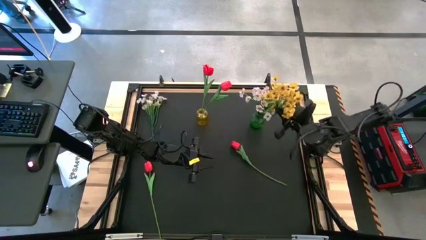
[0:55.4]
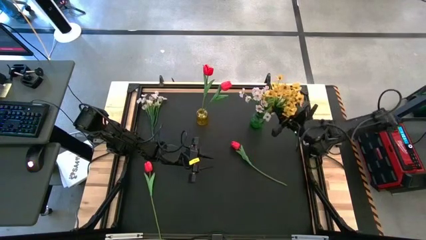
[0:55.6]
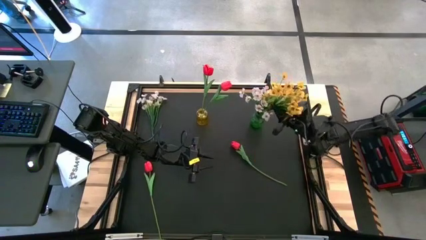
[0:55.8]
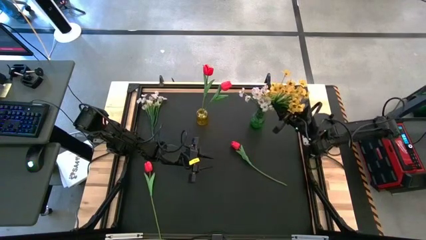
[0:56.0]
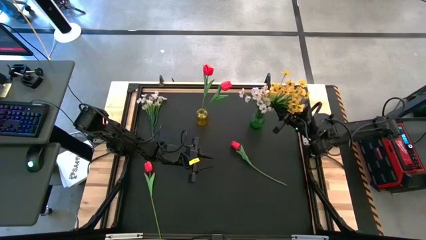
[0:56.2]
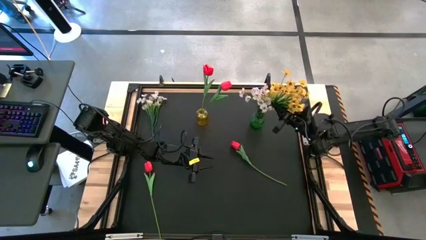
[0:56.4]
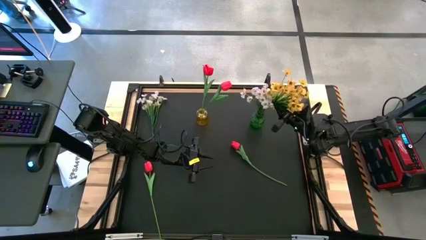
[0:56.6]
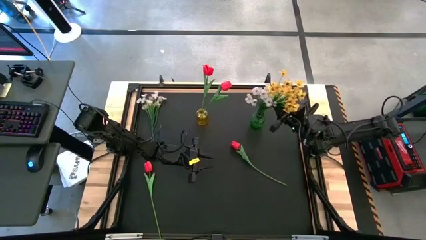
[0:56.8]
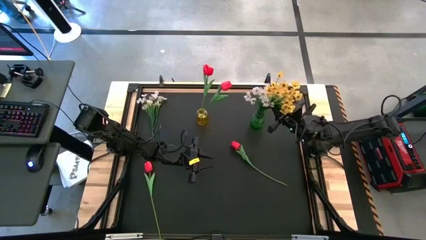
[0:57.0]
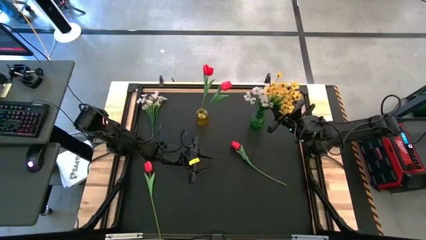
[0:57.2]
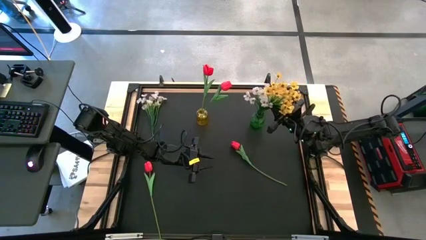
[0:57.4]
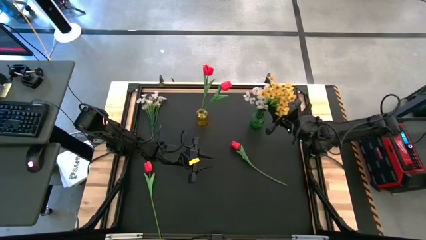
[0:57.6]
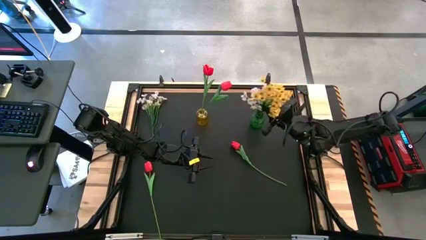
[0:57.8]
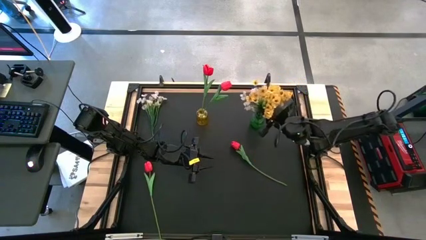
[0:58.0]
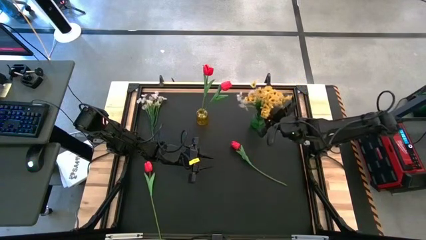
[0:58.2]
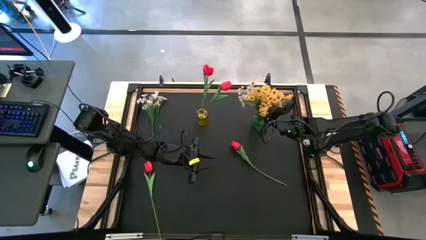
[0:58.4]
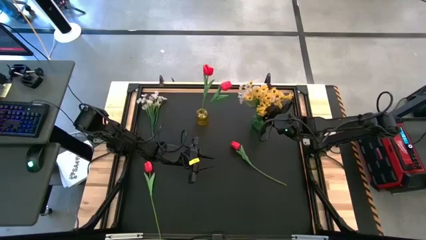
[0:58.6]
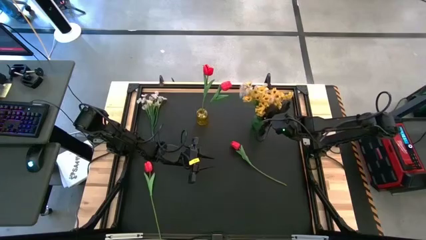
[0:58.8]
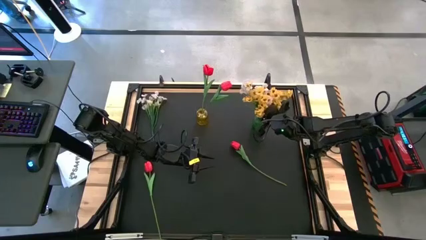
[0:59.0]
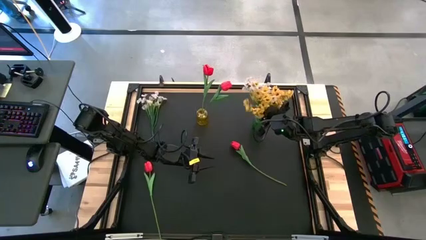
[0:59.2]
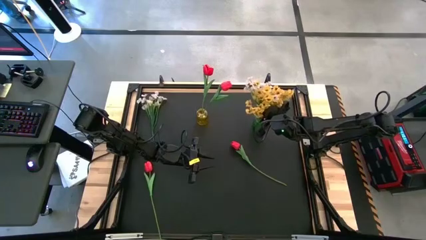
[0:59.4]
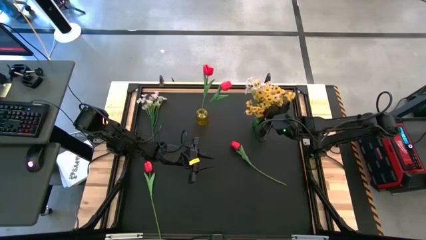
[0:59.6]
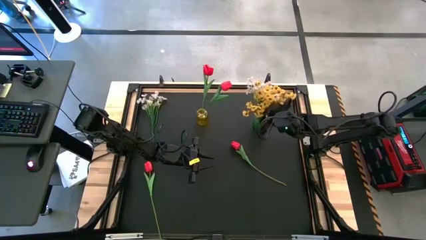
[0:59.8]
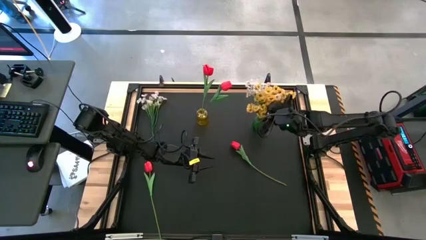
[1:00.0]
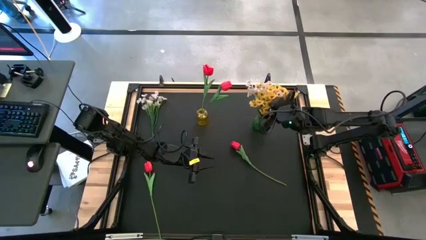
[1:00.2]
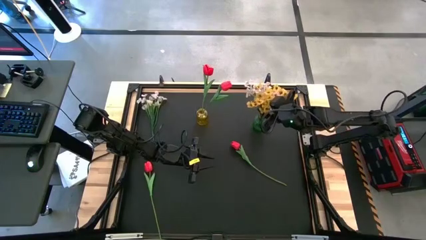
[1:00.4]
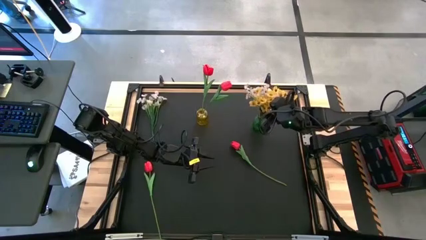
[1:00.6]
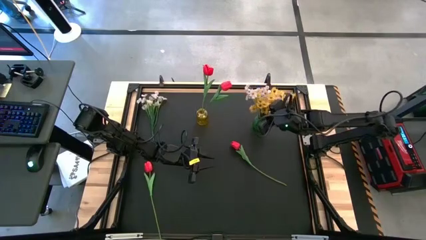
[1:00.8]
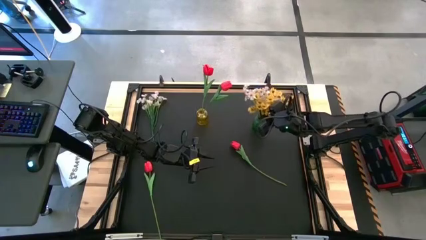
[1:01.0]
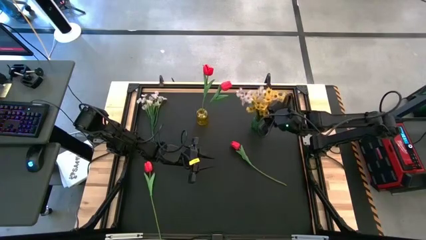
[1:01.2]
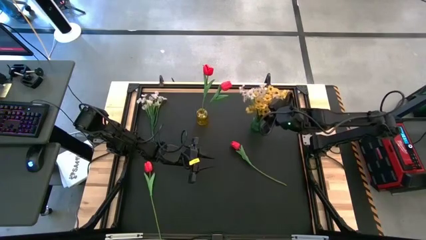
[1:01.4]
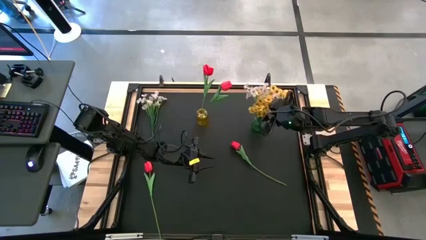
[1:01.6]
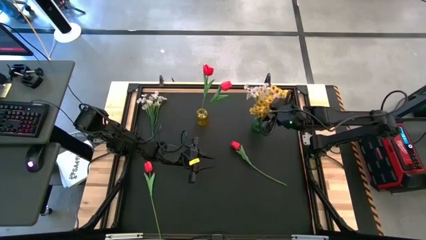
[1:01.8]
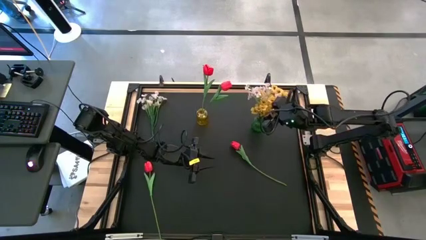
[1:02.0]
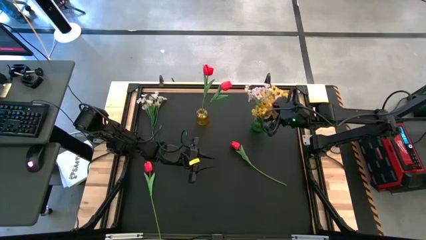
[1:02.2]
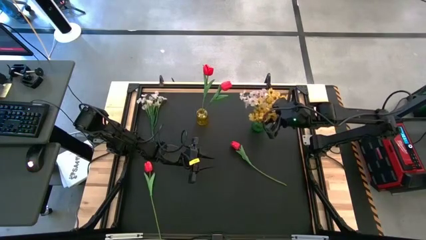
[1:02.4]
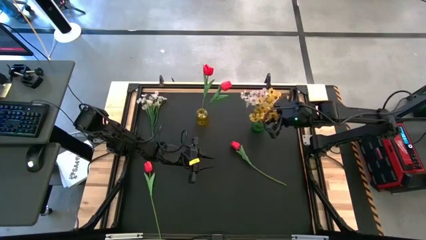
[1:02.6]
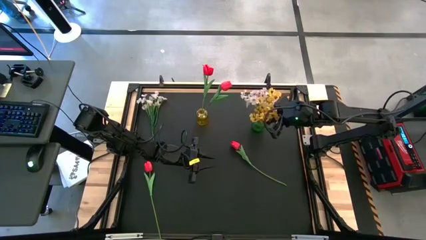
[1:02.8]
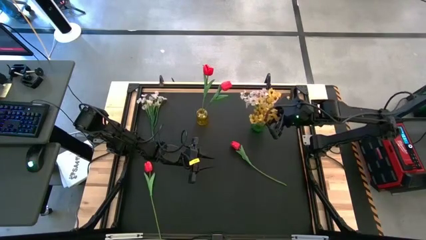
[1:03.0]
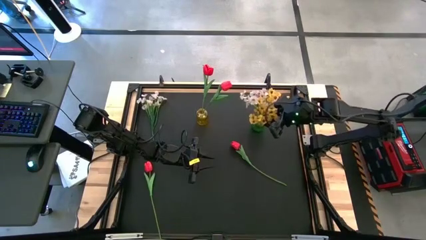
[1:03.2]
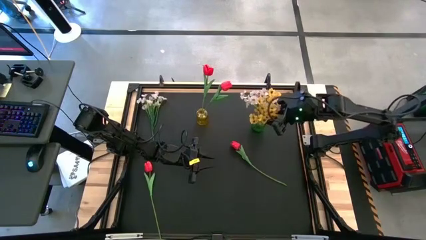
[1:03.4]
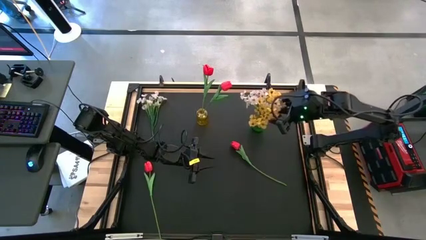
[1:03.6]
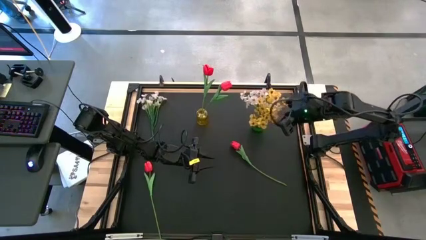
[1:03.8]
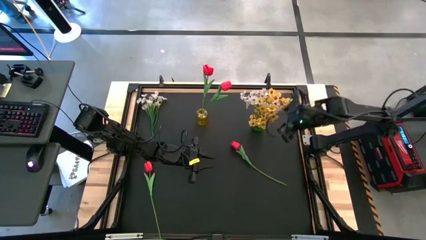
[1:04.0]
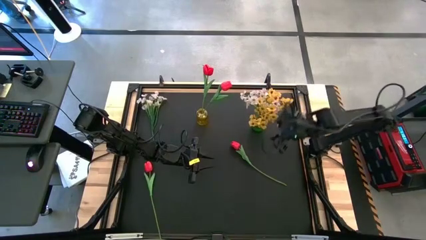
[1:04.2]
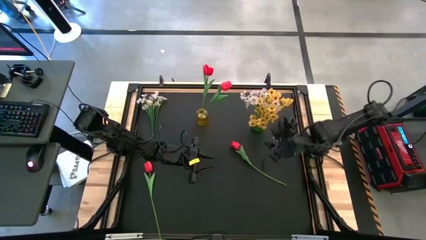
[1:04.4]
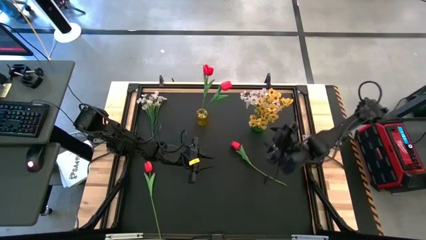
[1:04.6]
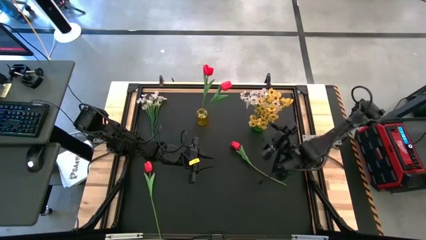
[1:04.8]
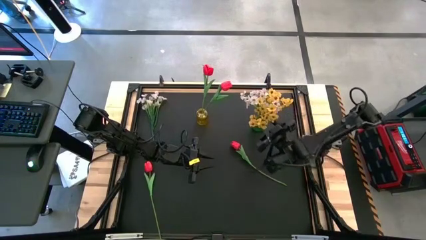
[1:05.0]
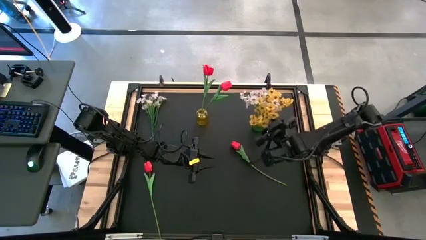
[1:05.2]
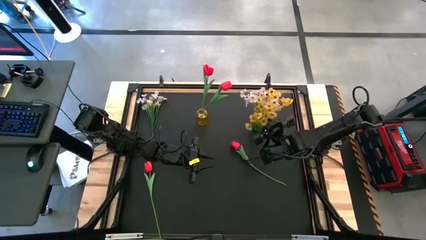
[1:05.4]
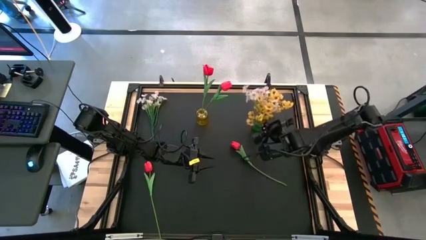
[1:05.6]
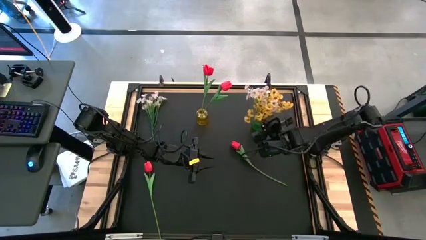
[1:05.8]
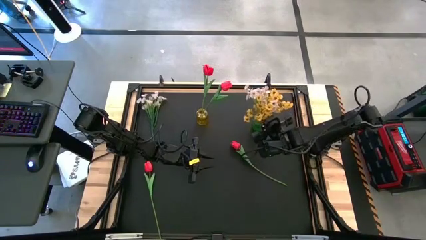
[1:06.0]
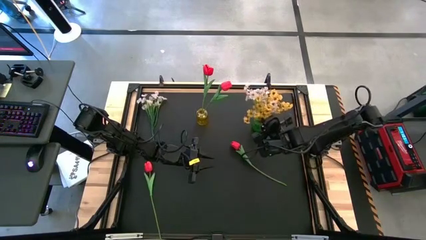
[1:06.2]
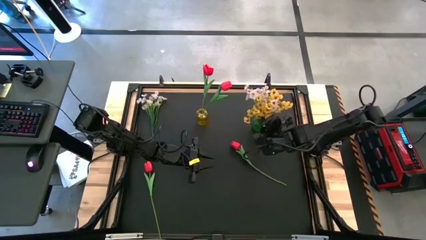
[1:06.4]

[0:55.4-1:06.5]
Task: Sort flowers into vase by color
Put the yellow flowers into the green vase

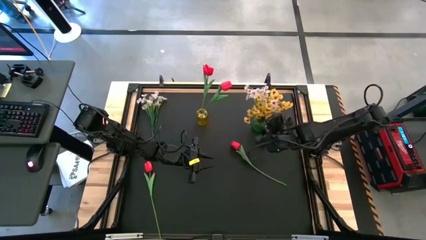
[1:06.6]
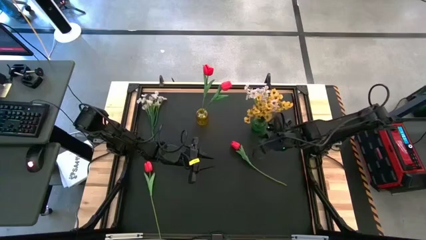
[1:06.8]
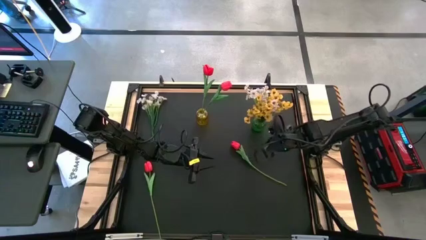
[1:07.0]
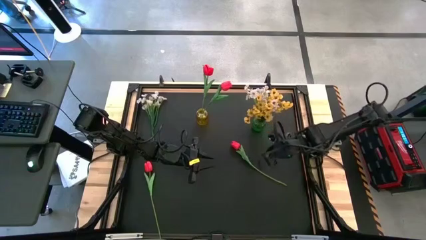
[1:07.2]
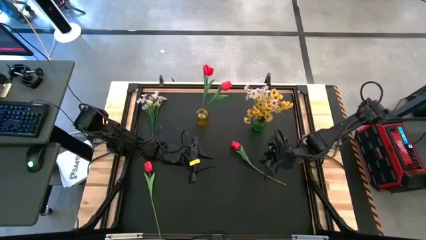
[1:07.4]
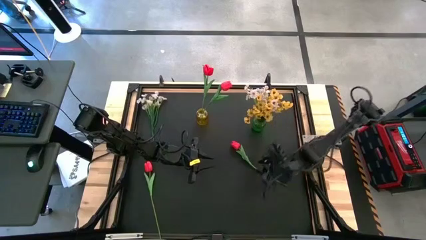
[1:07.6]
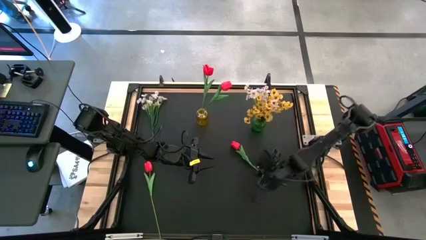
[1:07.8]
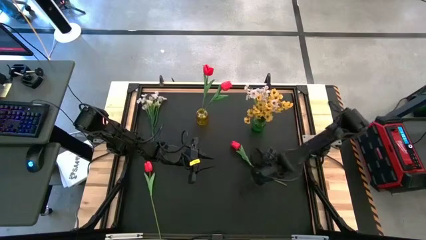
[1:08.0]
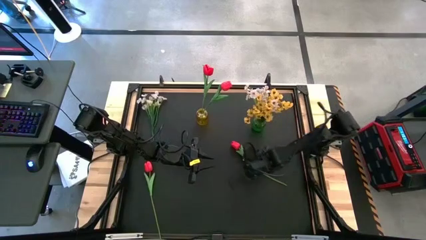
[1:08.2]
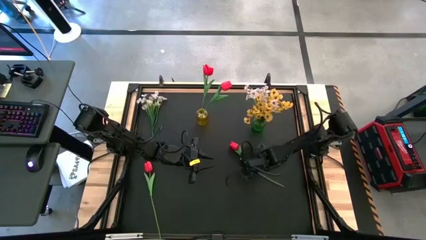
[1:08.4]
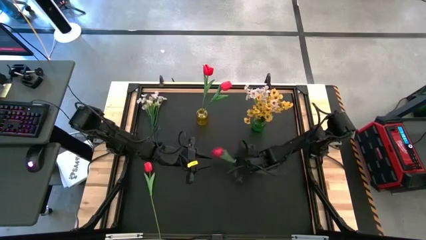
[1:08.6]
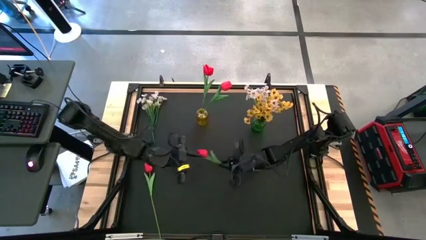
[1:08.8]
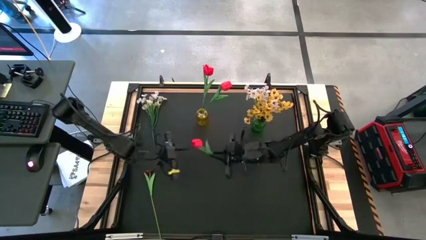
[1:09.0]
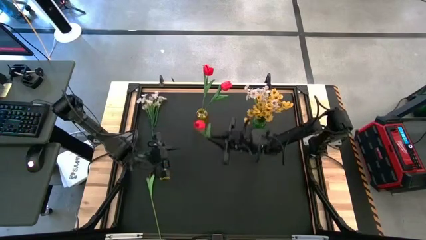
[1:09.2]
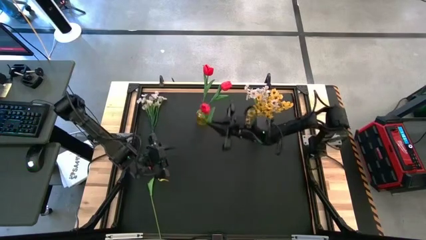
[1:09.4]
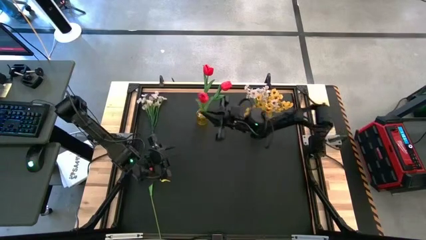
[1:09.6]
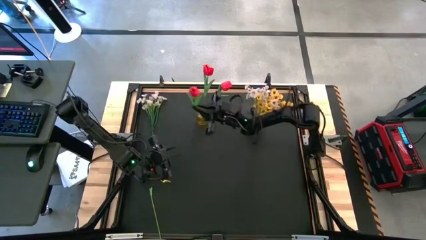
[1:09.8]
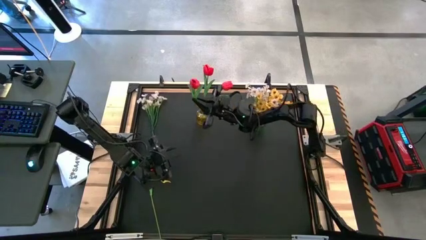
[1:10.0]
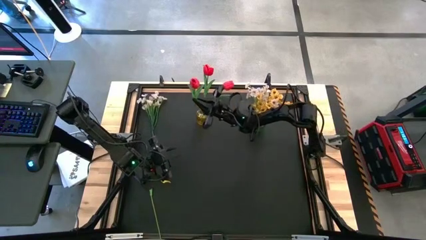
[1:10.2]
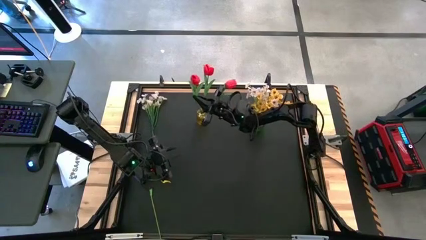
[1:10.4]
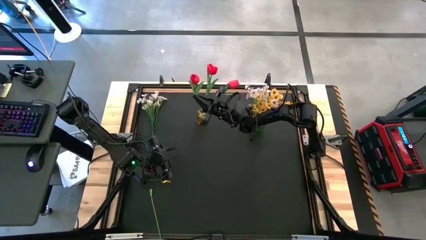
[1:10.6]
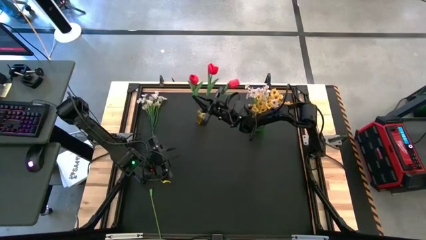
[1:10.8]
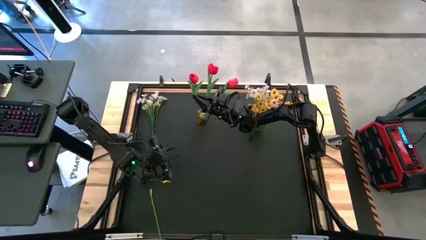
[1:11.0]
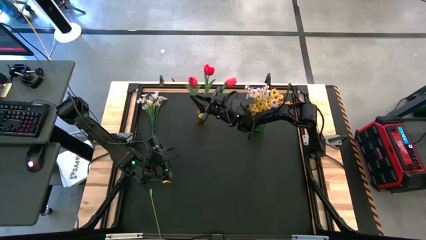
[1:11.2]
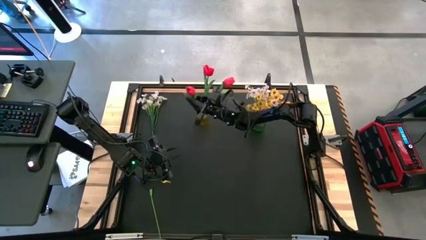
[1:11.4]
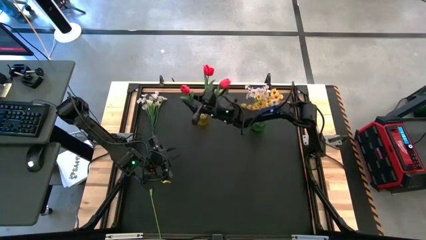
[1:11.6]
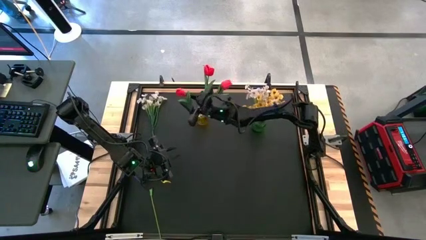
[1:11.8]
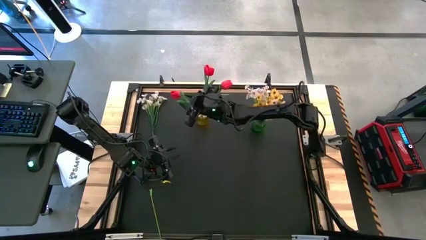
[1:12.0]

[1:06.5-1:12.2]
Put the red tulip into the yellow vase
